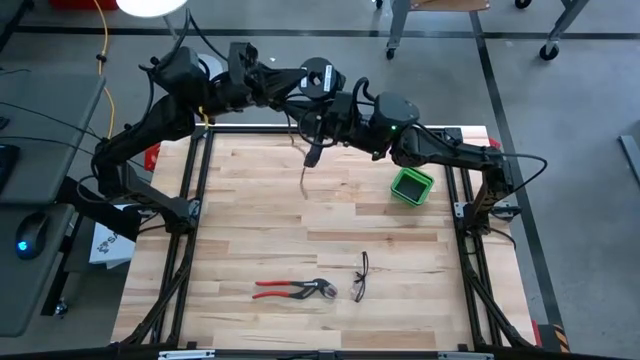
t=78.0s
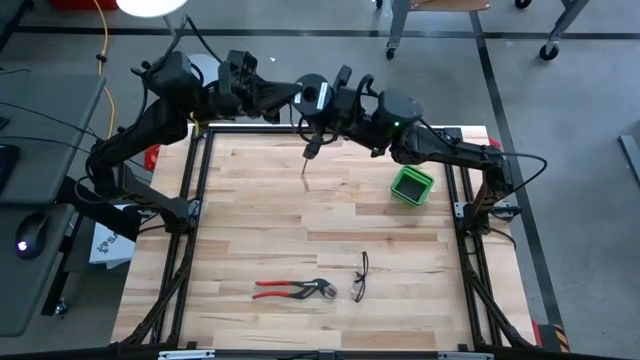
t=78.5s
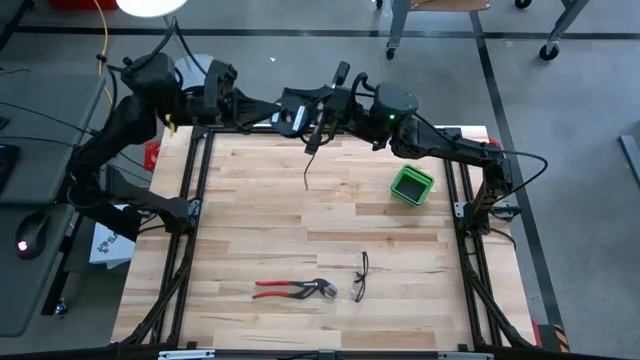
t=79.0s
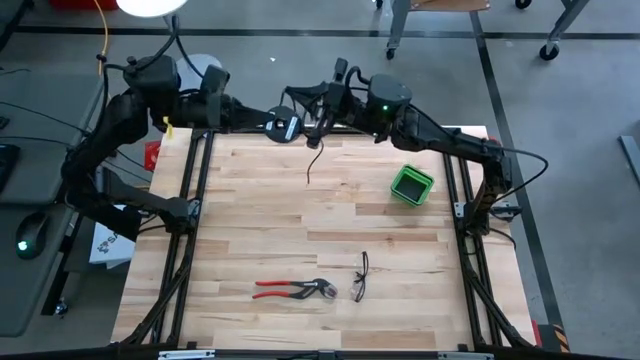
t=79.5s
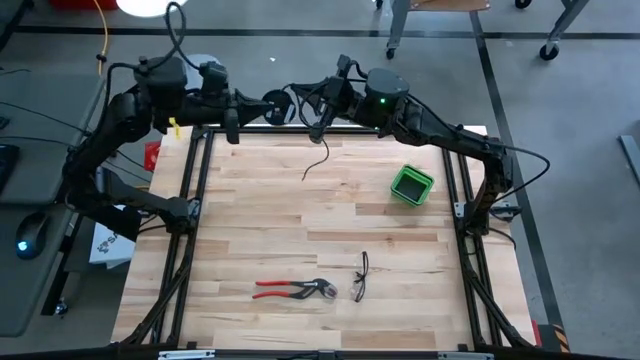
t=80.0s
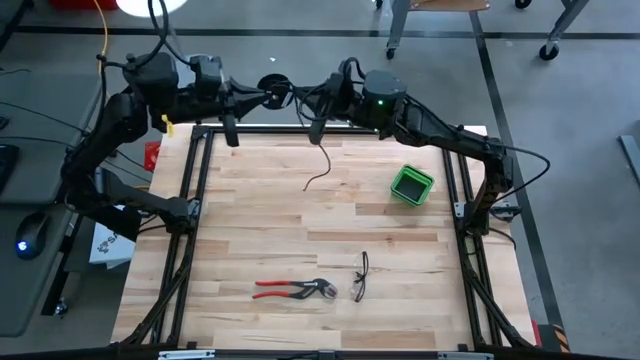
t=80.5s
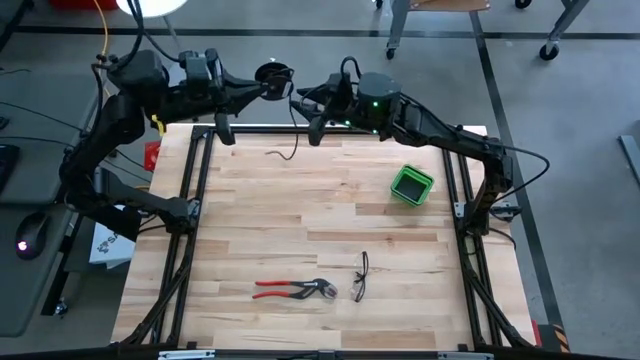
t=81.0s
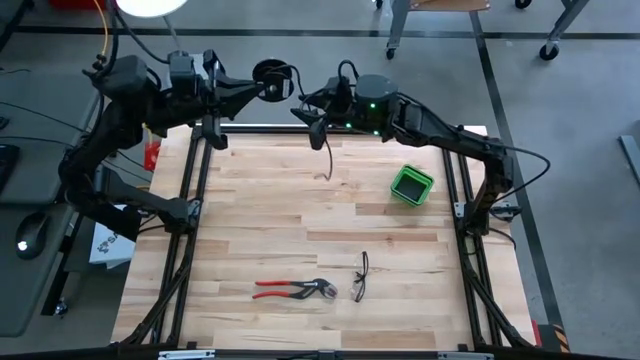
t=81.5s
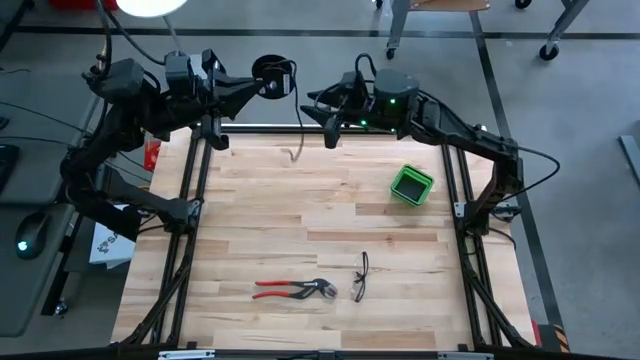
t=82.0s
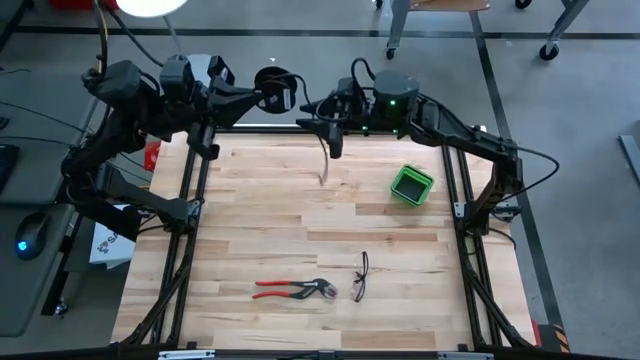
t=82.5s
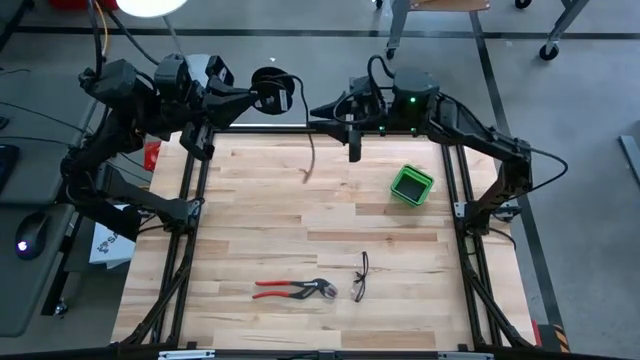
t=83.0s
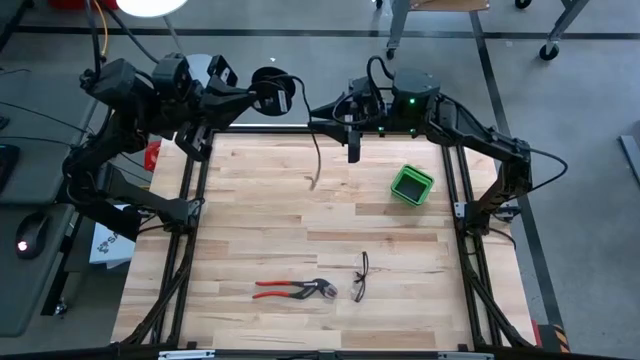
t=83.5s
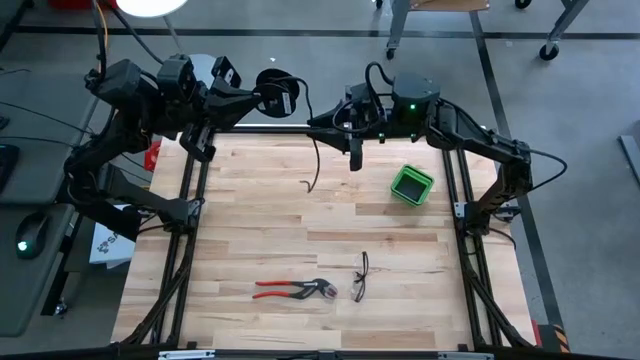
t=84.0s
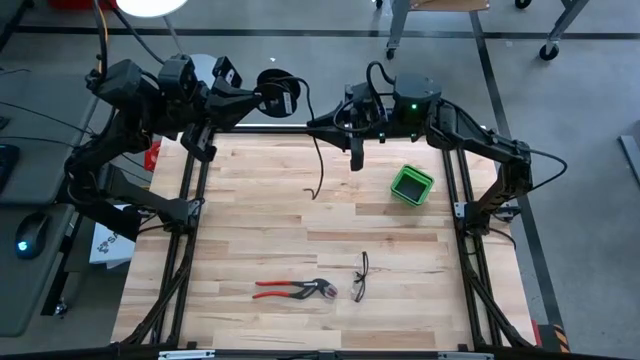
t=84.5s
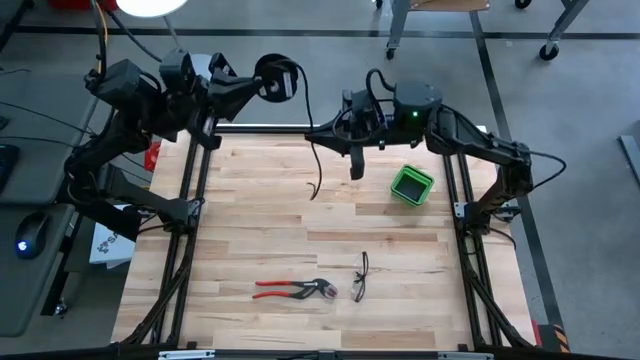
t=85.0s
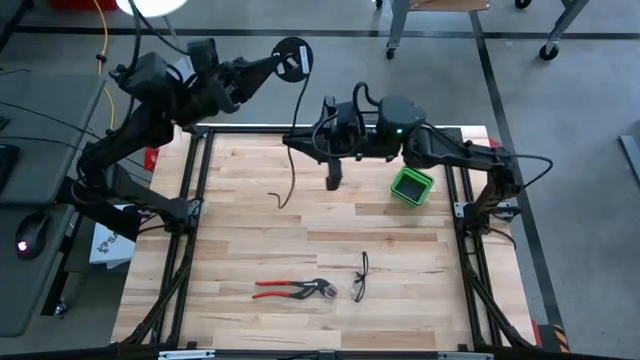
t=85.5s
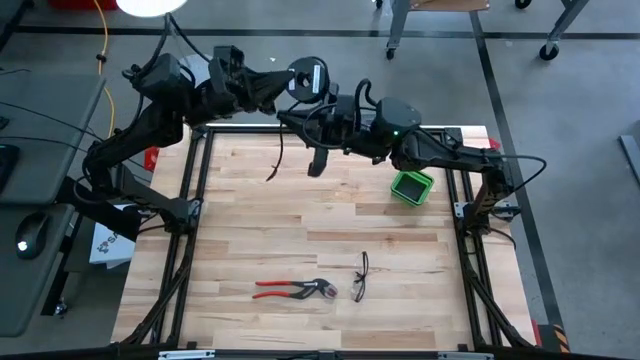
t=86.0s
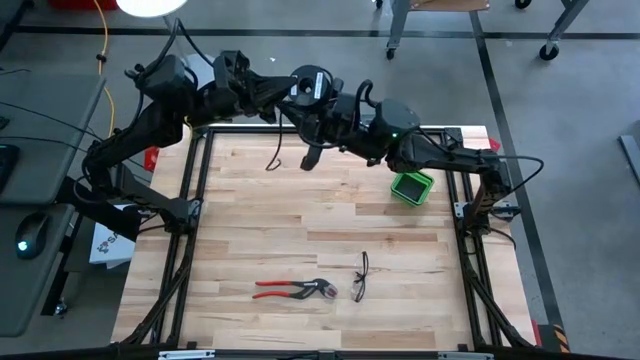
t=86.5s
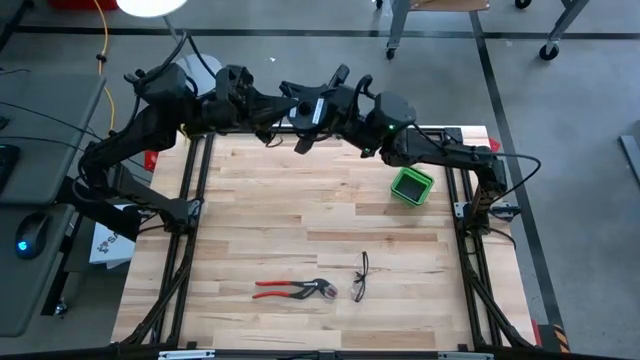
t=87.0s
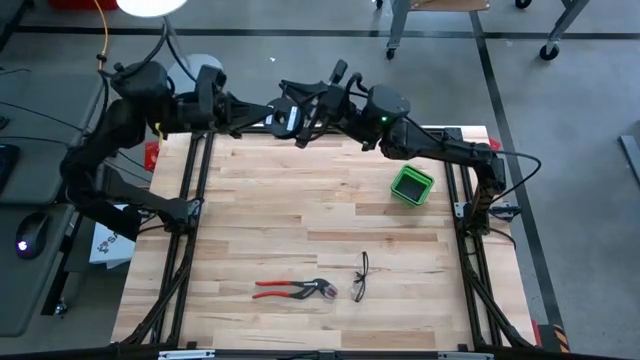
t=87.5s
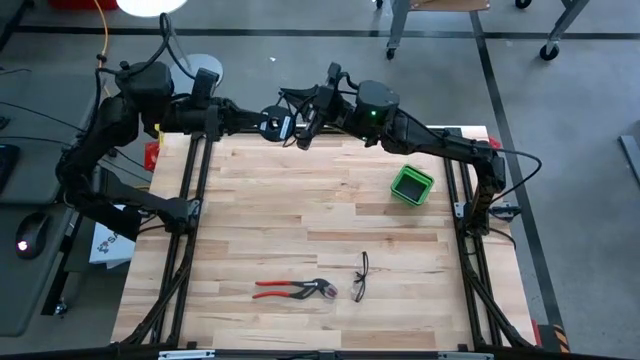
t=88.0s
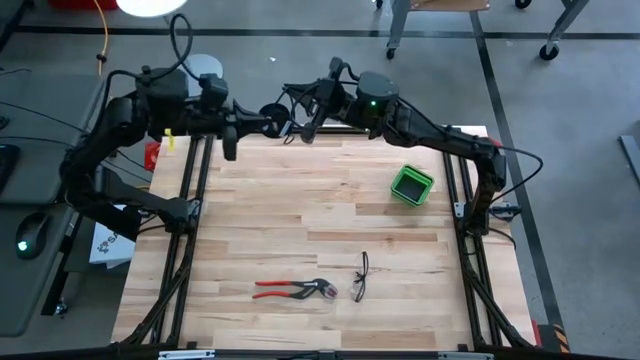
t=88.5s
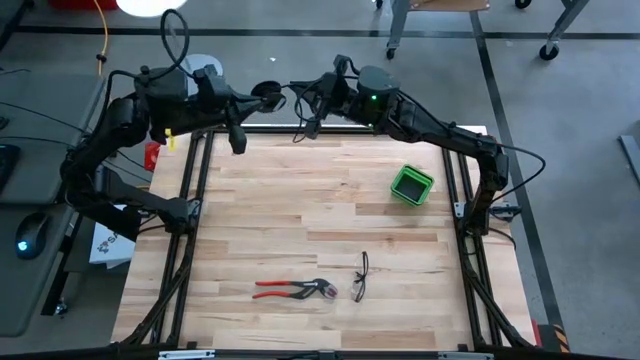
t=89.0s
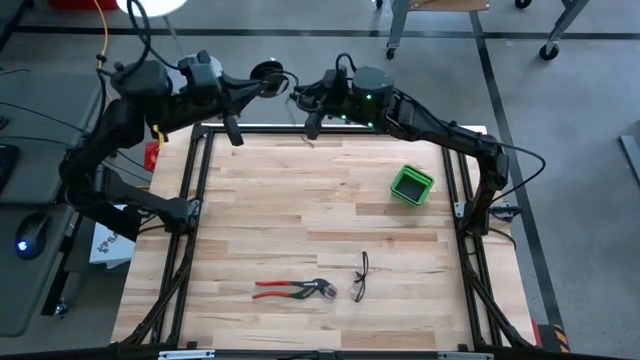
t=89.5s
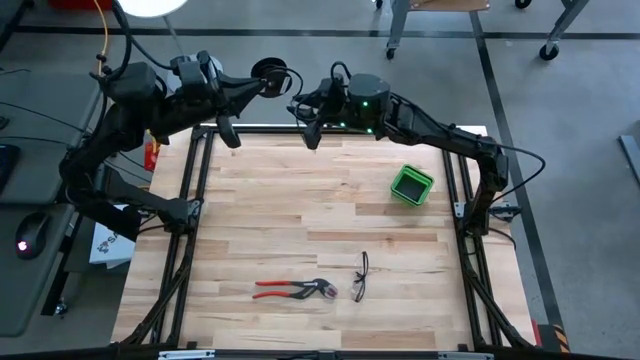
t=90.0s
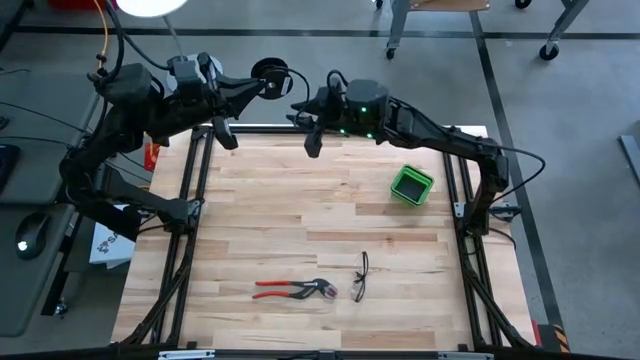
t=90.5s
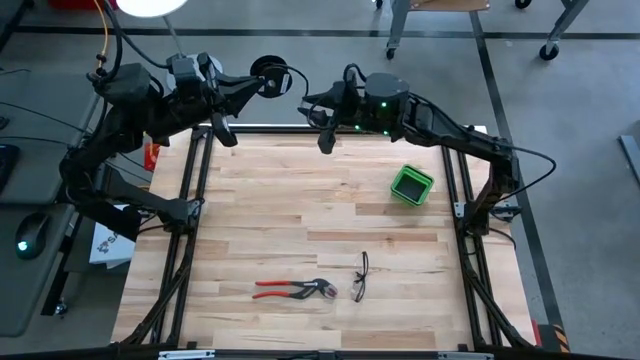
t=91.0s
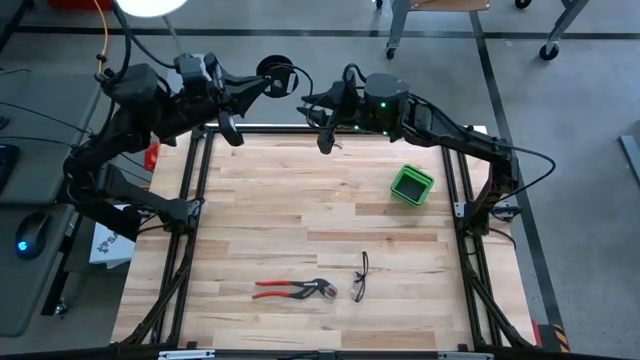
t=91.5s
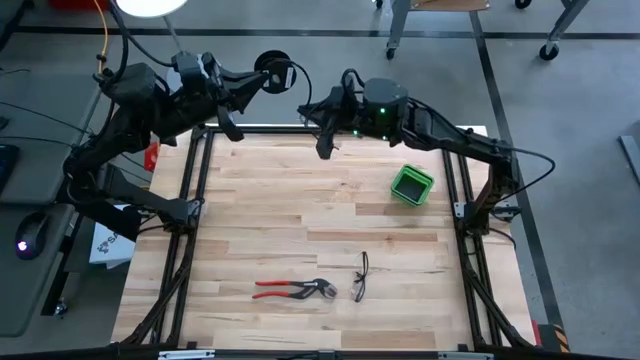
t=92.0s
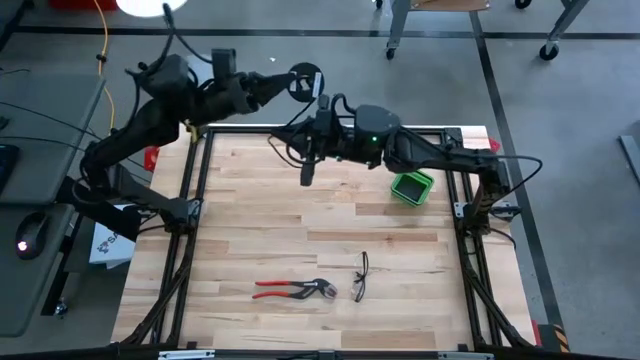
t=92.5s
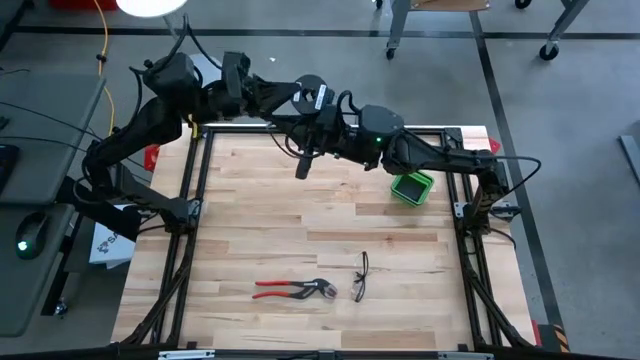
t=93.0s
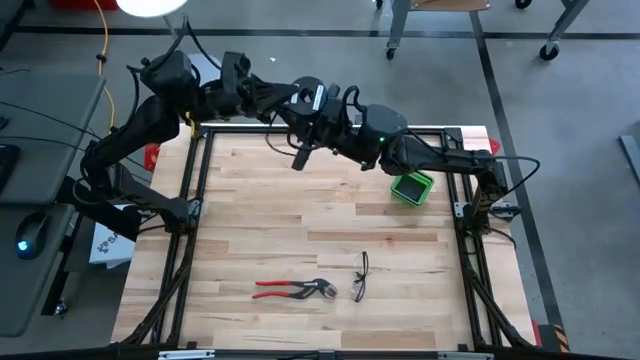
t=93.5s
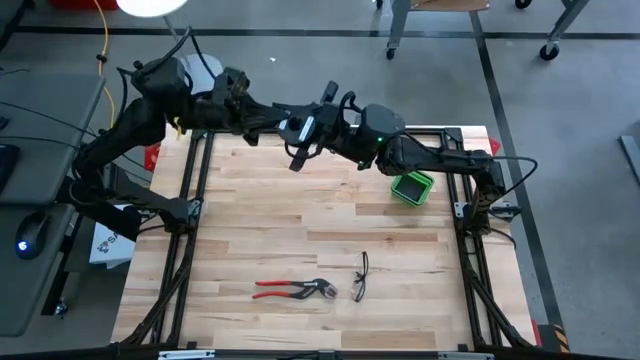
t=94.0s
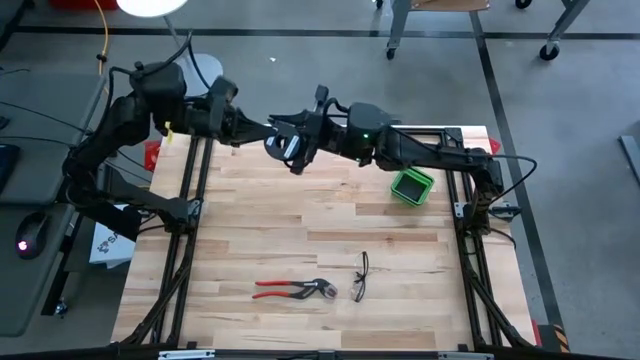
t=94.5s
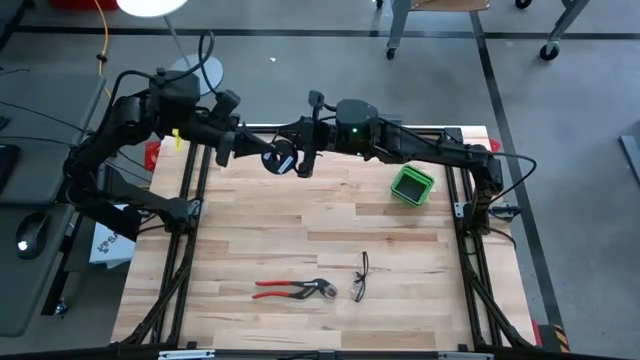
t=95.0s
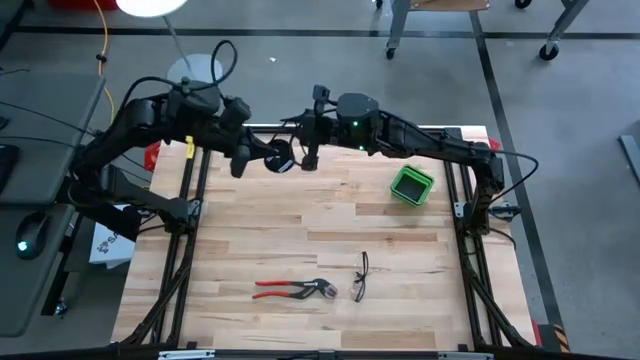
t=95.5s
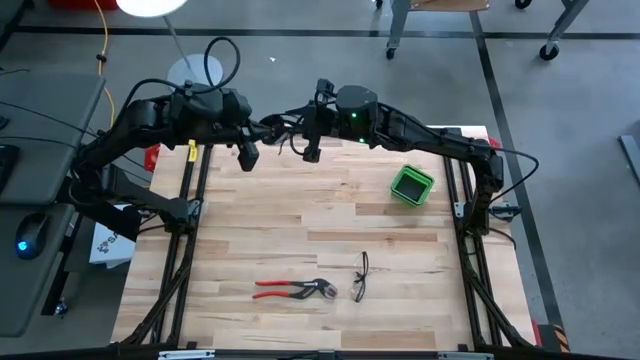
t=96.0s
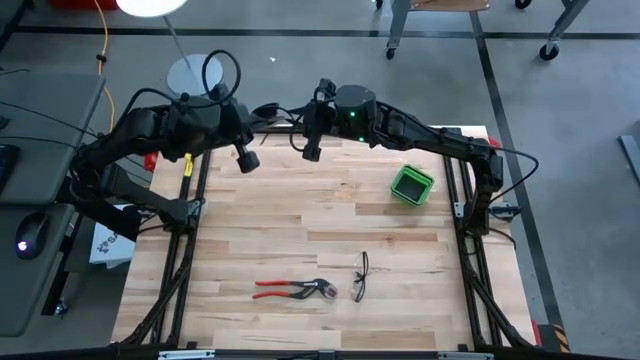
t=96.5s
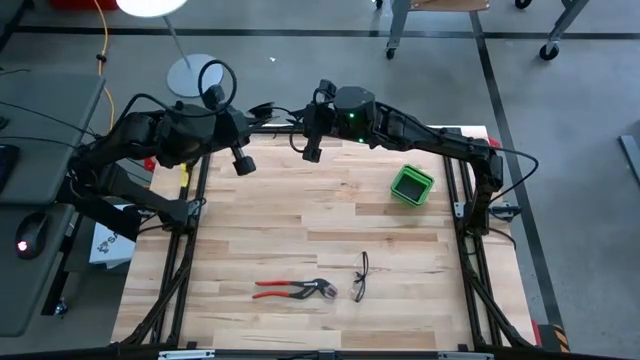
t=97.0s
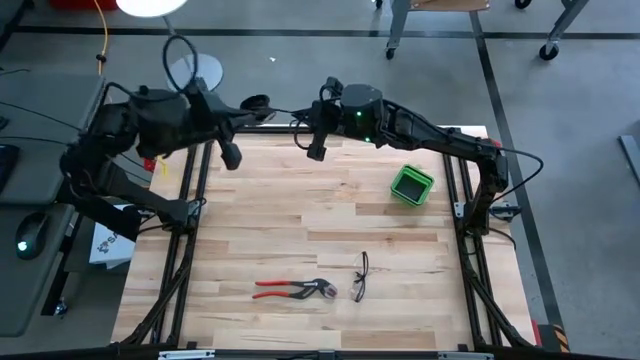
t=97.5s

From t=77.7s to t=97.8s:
Task: Coil cords
Coil the black wire on the black spool

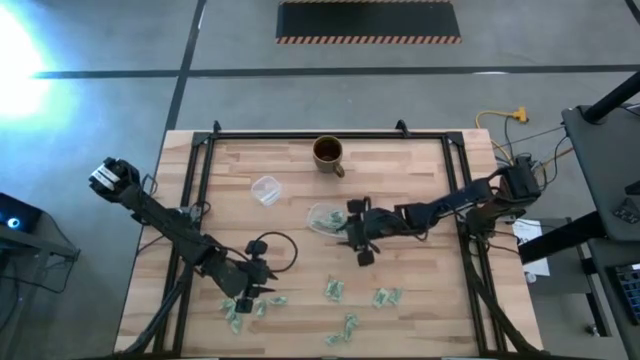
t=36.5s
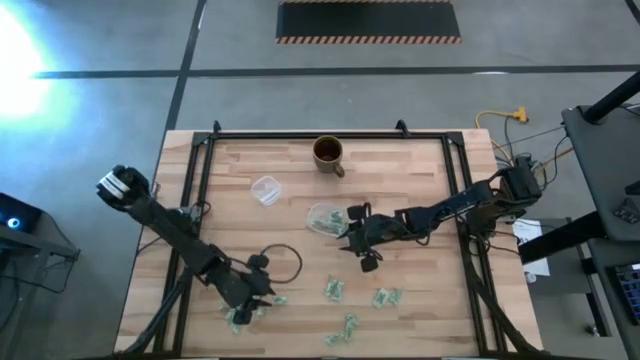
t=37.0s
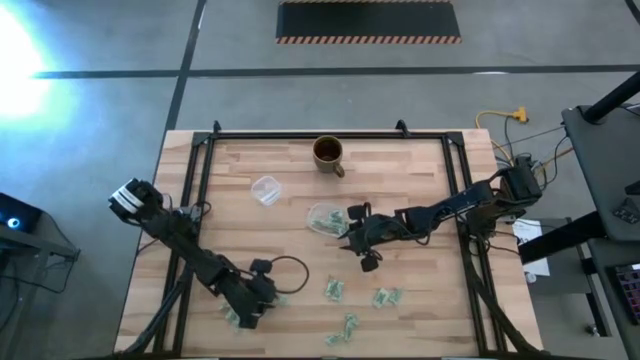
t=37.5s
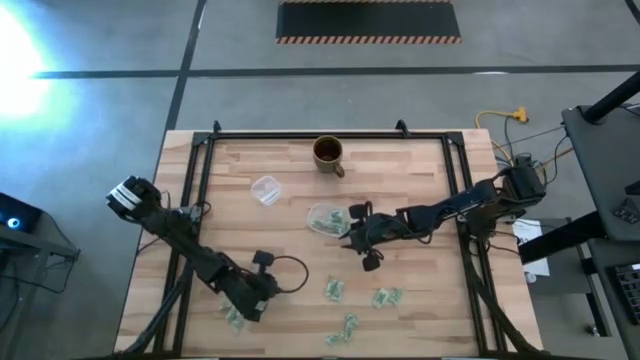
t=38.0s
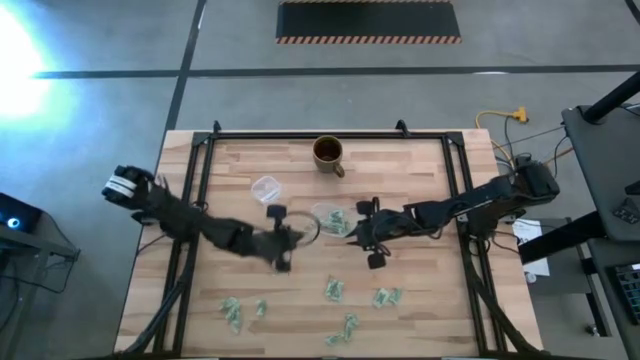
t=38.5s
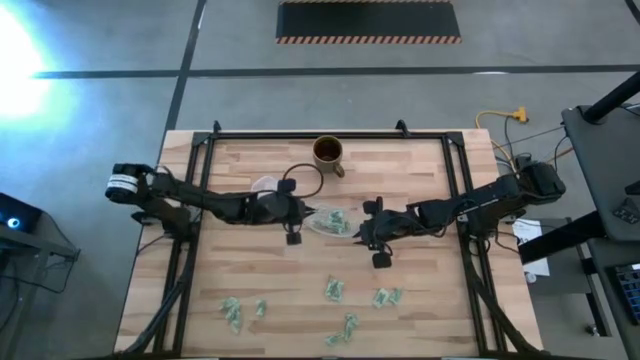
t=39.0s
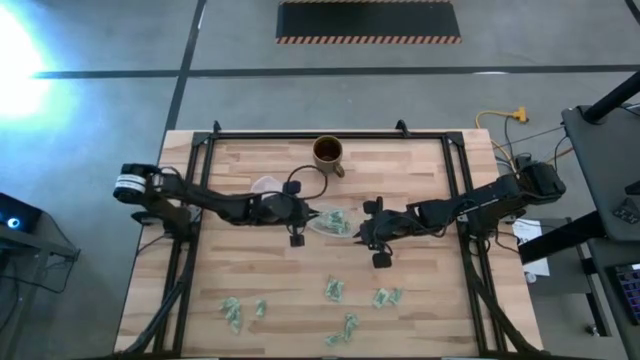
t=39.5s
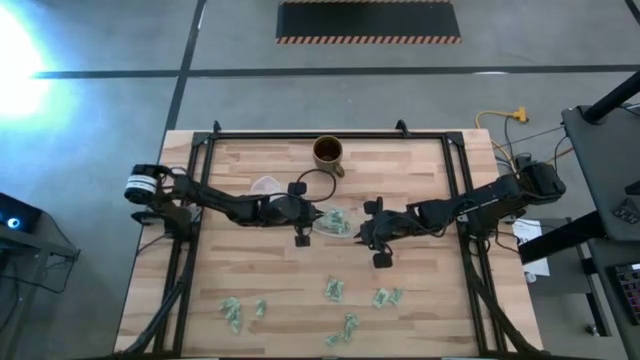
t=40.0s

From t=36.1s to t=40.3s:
Task: Pick and place Stevia / Truvia into bins
Put the green stevia packet into the transparent container
